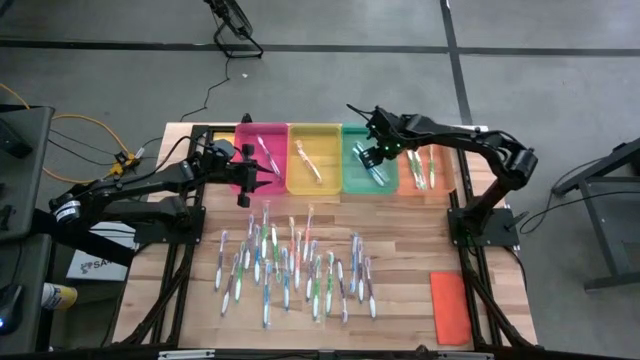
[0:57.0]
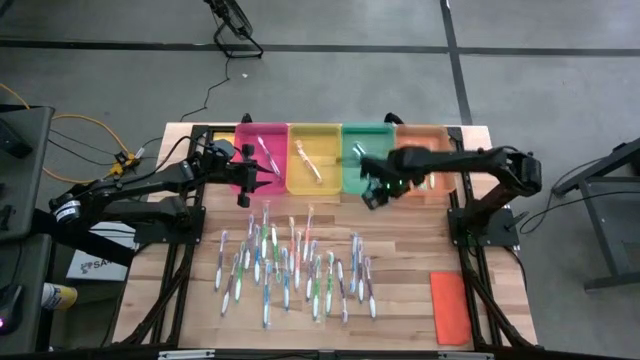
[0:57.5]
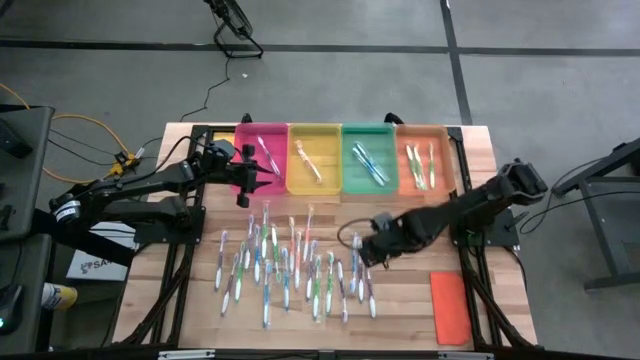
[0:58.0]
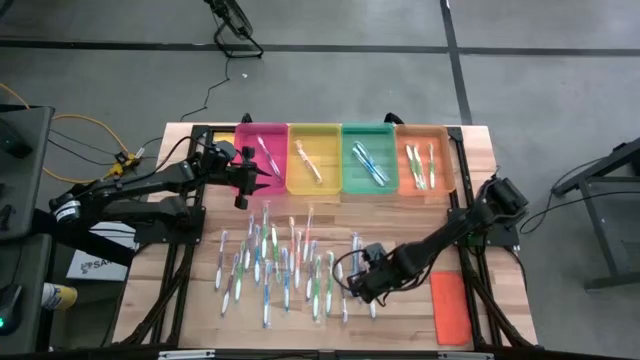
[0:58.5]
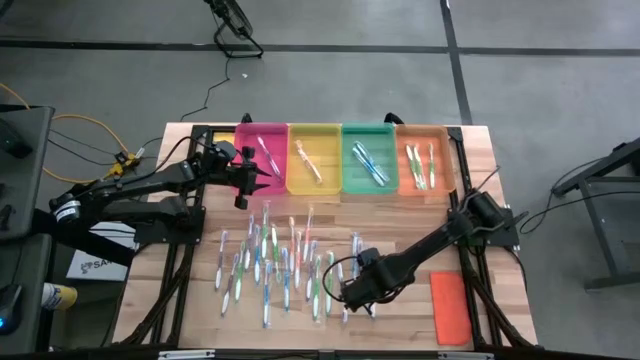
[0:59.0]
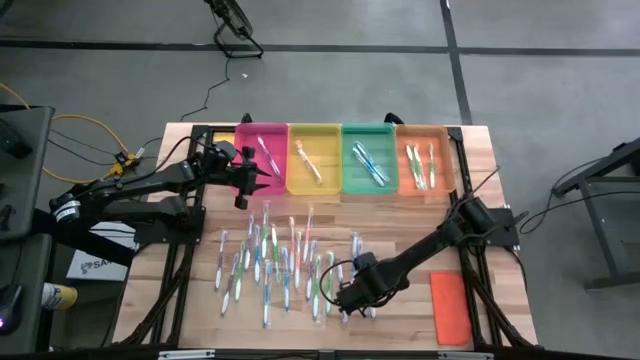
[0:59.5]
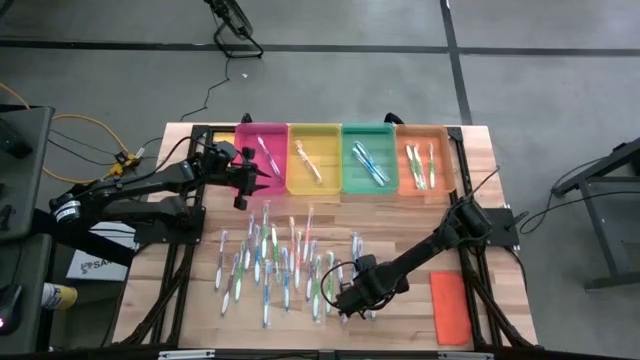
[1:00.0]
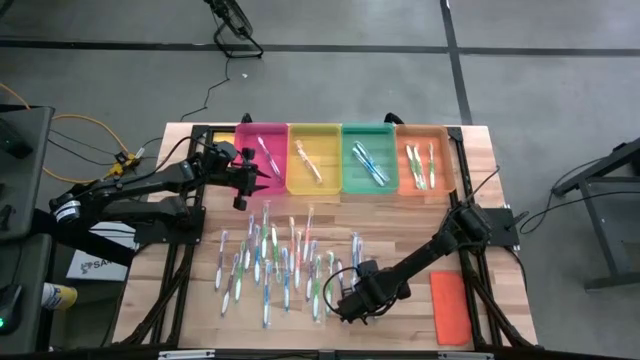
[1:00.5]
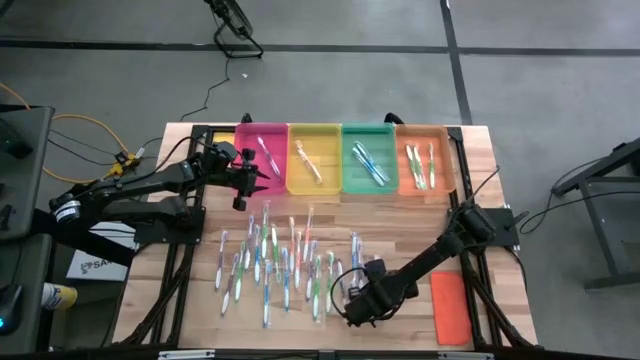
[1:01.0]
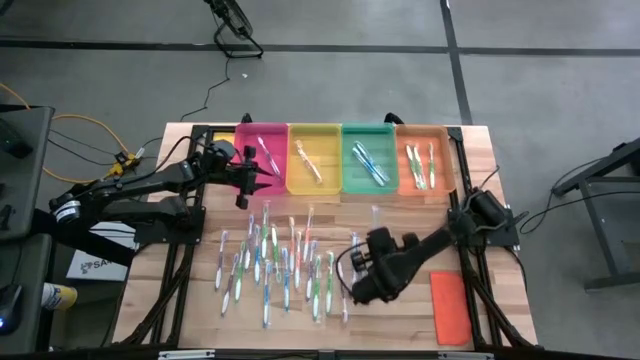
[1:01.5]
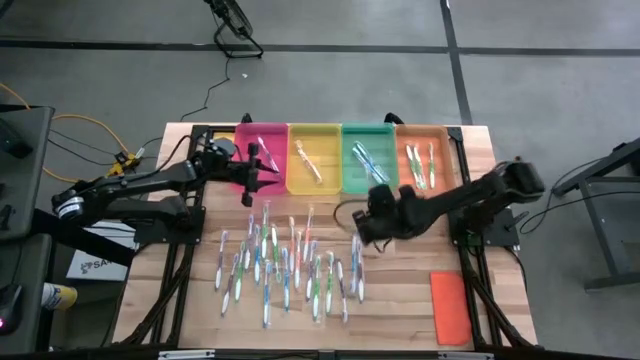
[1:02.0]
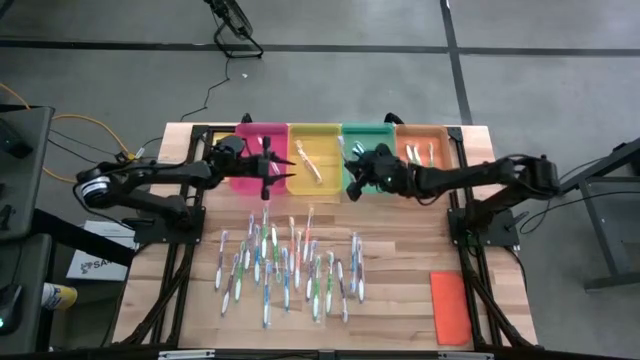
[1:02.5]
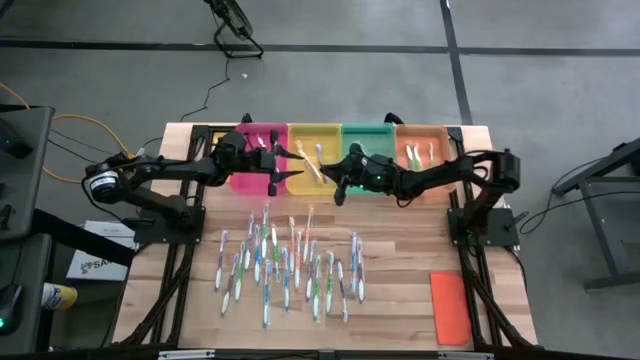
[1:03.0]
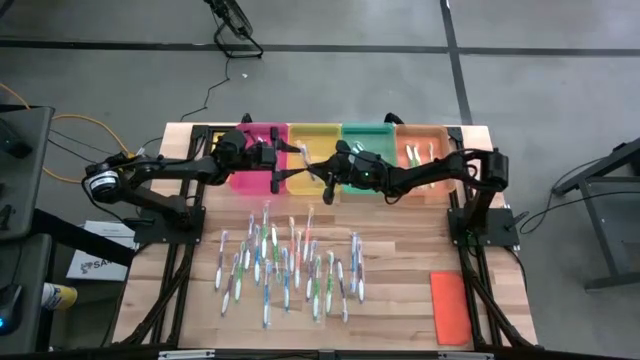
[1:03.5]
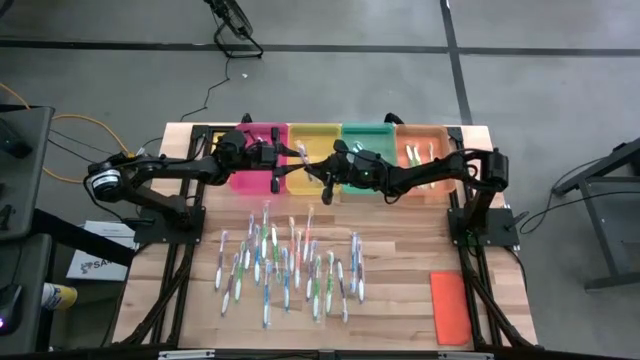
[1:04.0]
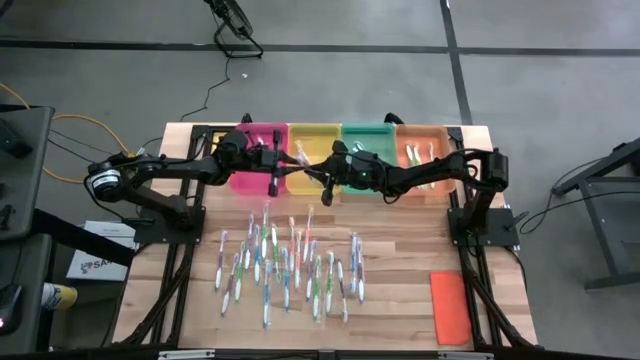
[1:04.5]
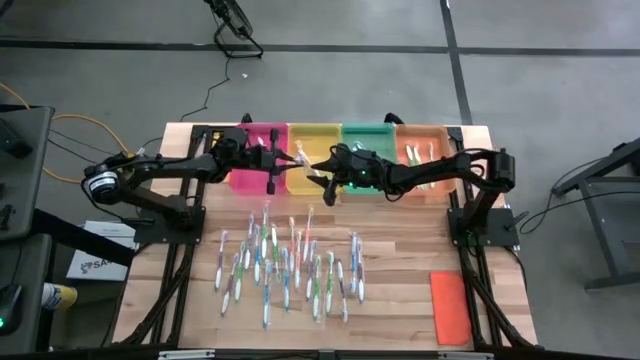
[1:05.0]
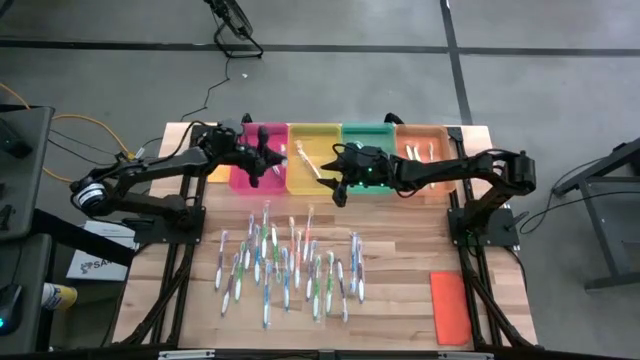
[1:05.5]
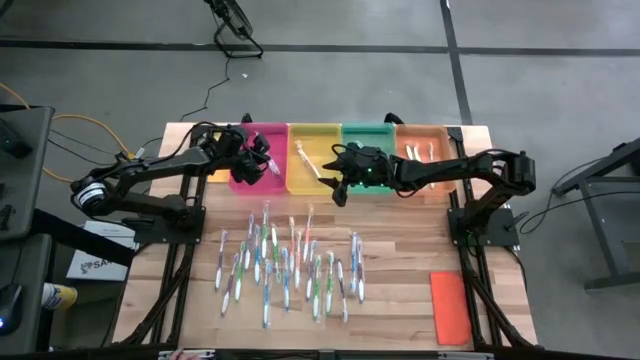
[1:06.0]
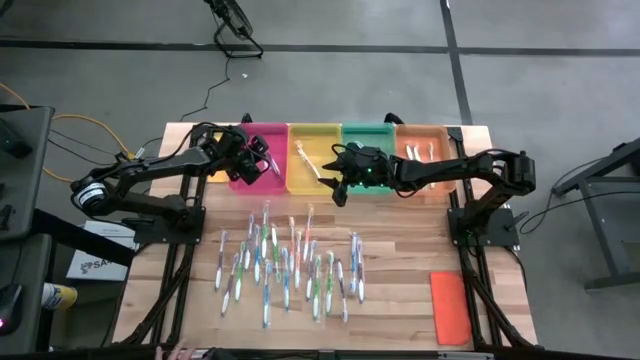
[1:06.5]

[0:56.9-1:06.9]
Task: Pick & Place Toothbrushes
Put the purple toothbrush into the pink bin

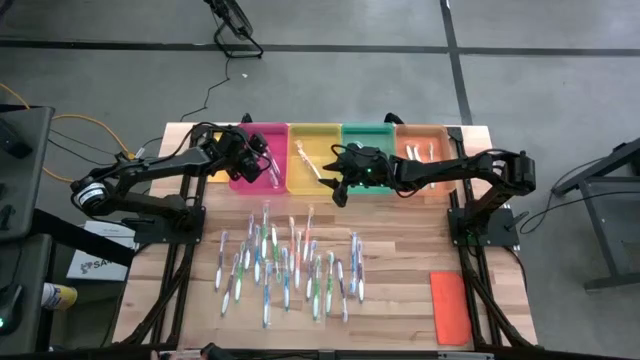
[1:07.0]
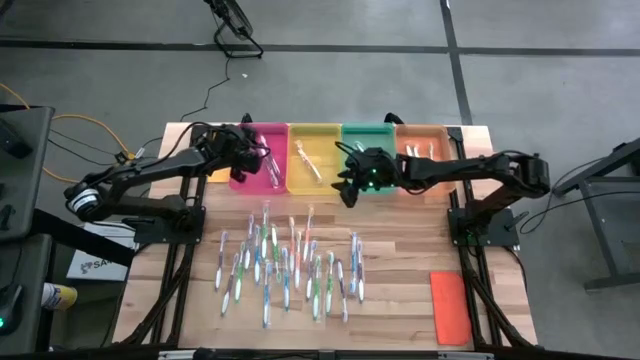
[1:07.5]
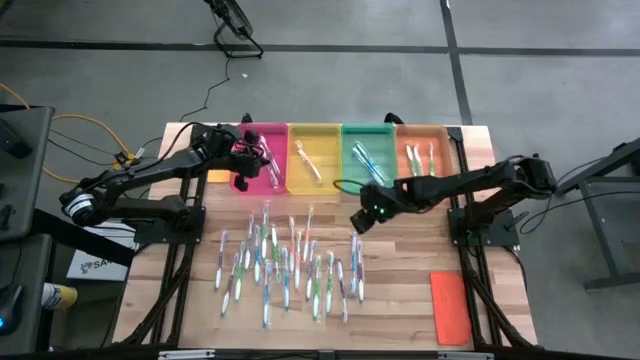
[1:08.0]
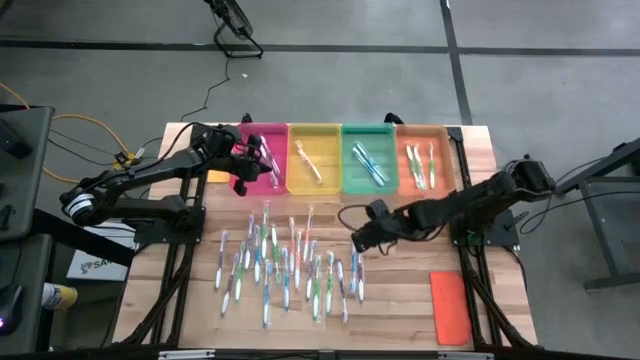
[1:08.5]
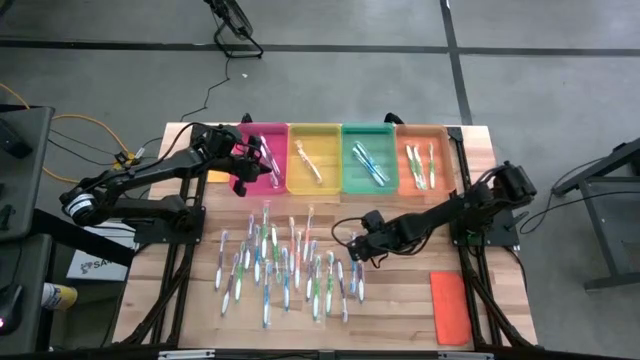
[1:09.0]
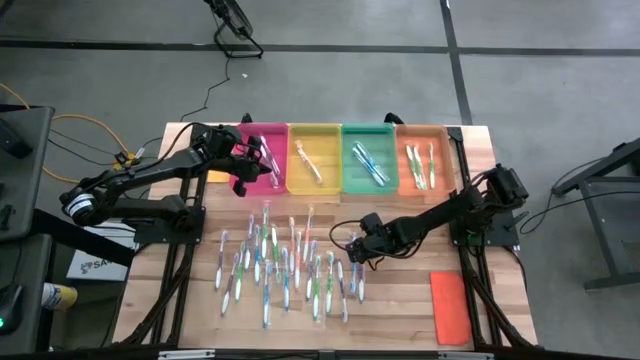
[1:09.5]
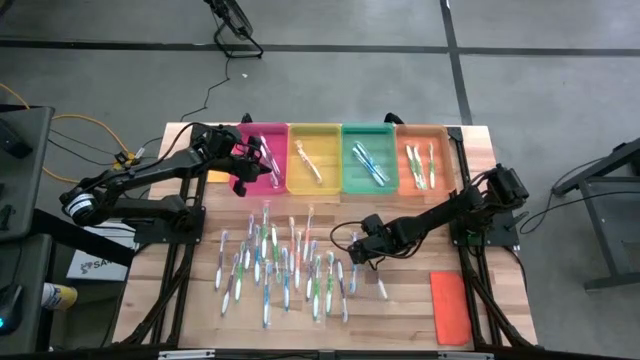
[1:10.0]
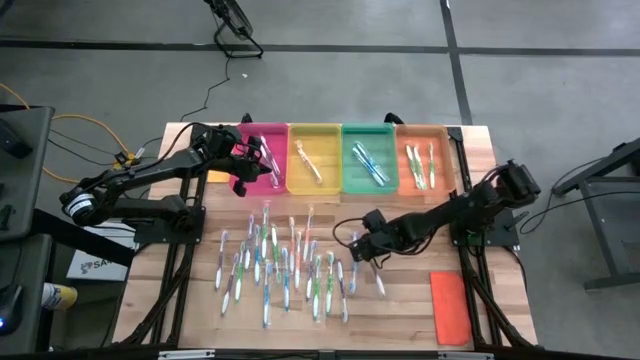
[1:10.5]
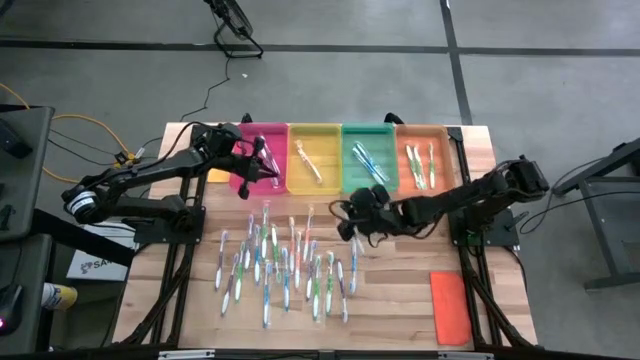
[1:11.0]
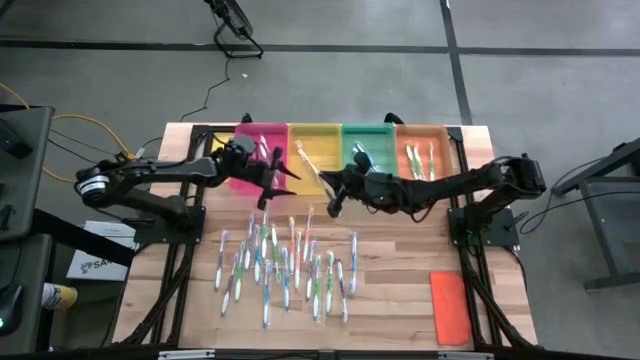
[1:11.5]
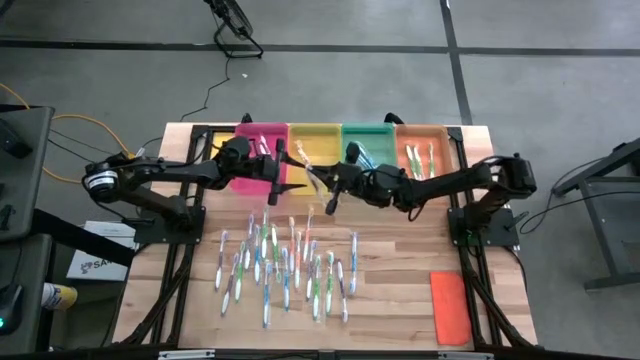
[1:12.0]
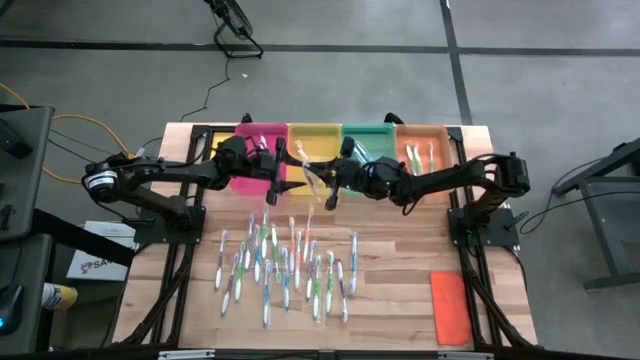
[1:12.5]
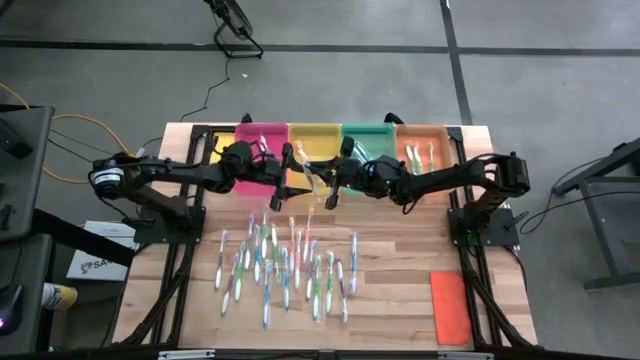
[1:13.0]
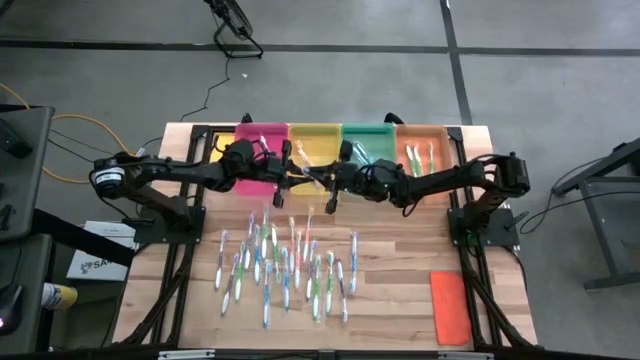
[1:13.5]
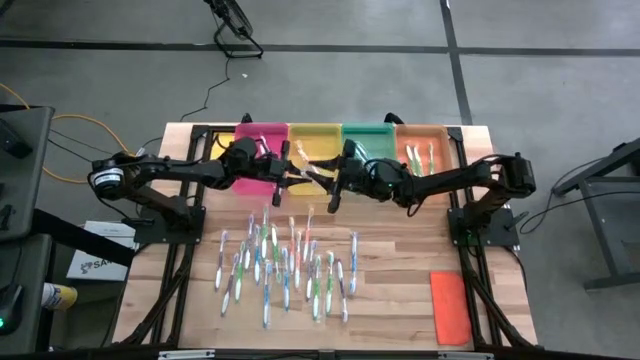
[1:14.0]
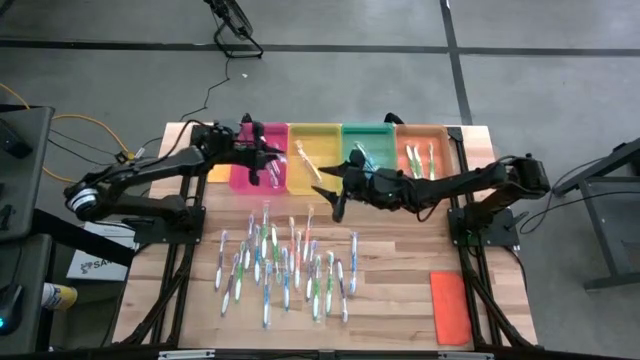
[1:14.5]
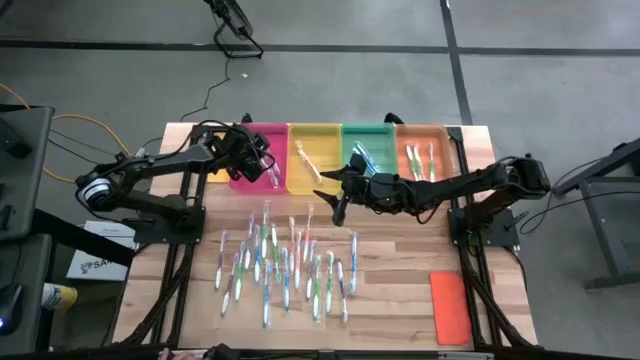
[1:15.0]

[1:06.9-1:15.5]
Put the purple toothbrush into the pink bin

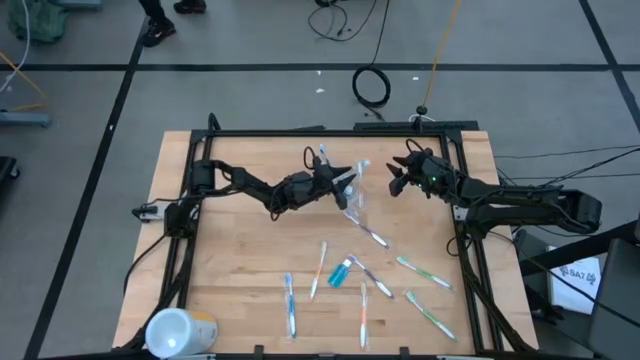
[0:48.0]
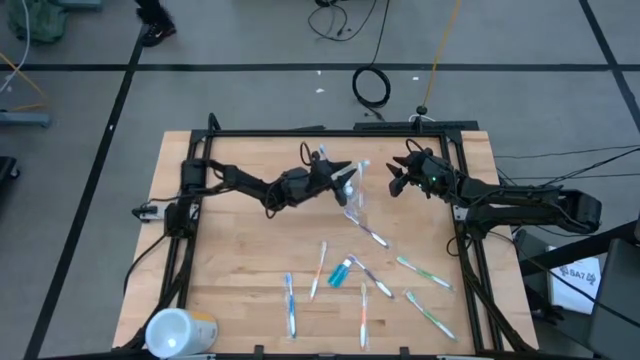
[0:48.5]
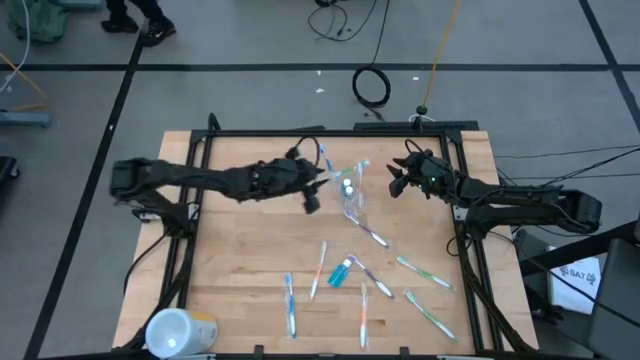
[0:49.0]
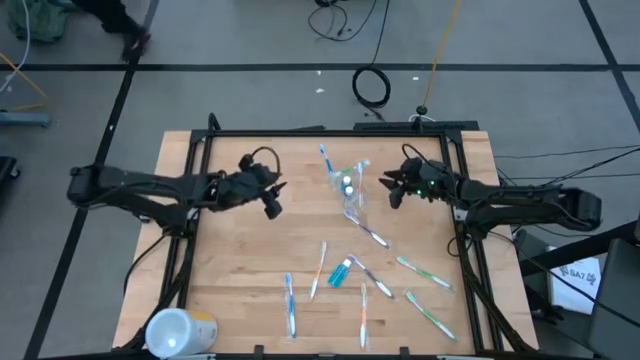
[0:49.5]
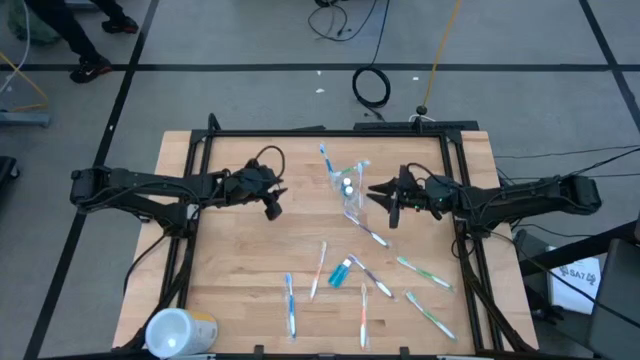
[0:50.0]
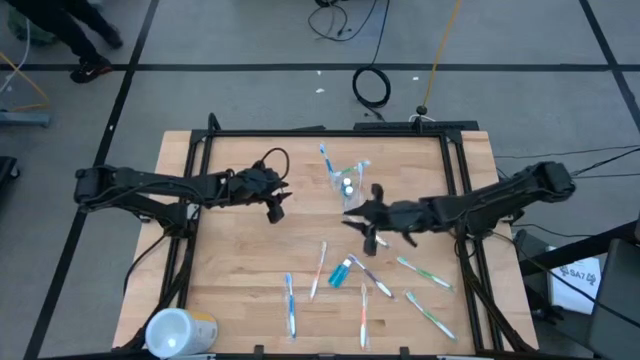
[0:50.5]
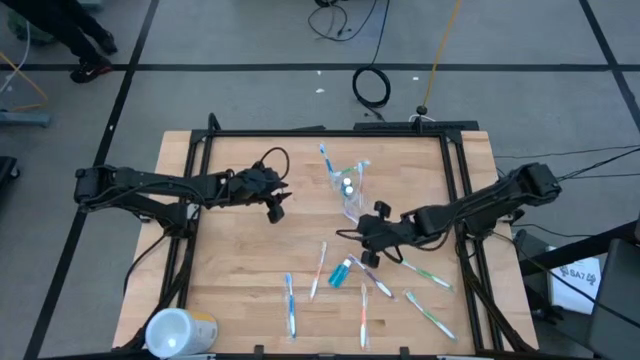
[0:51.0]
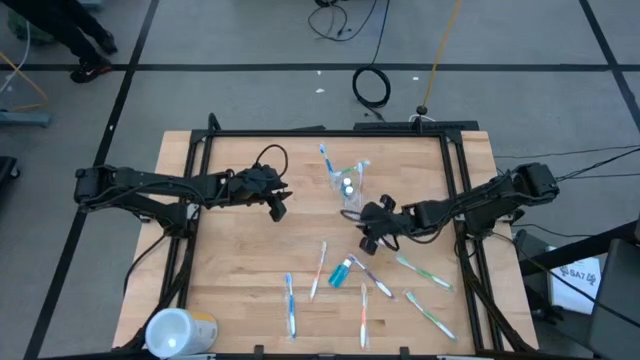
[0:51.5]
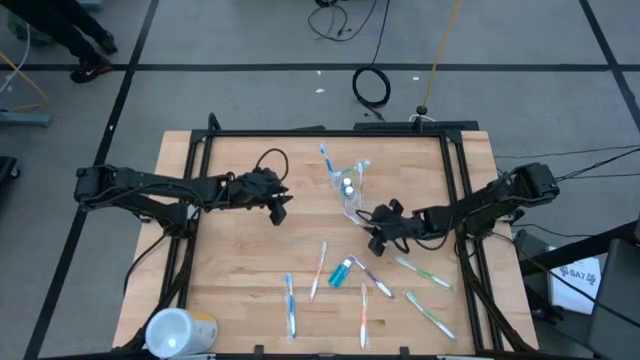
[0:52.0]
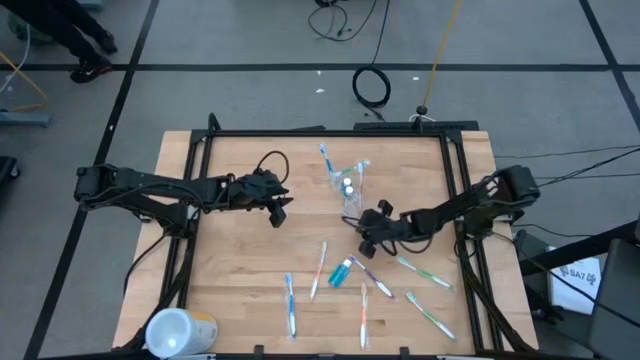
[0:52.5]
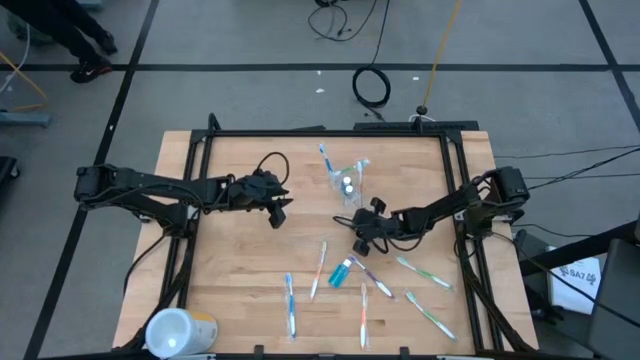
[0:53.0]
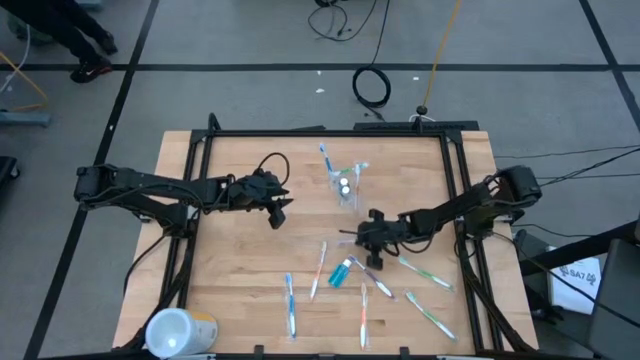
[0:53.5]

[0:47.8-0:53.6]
Task: Pick & Place toothbrushing station
Put the top violet toothbrush into the transparent organizer
